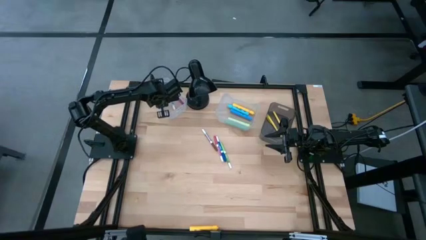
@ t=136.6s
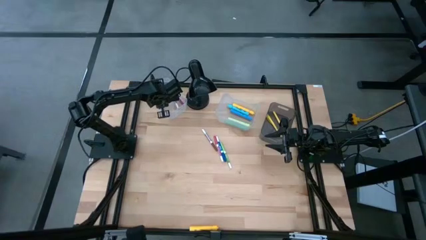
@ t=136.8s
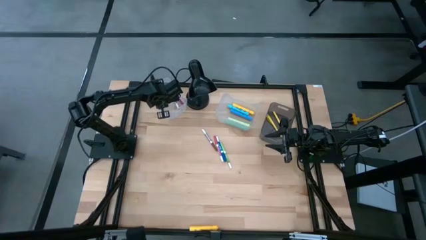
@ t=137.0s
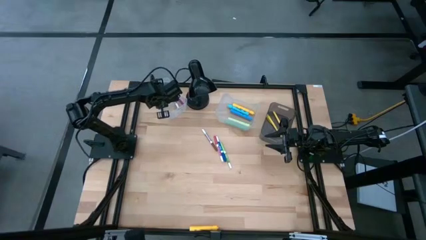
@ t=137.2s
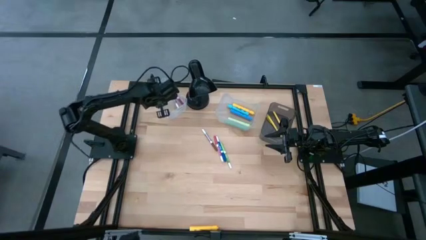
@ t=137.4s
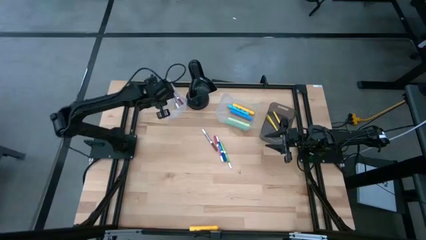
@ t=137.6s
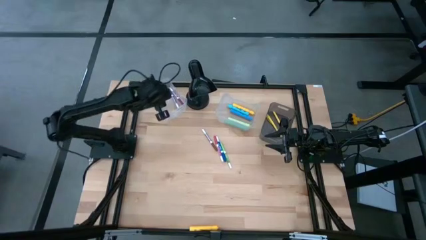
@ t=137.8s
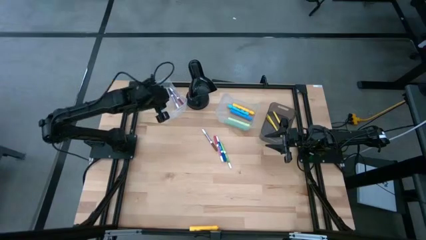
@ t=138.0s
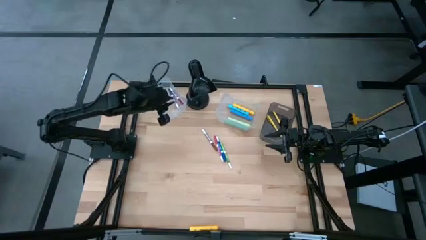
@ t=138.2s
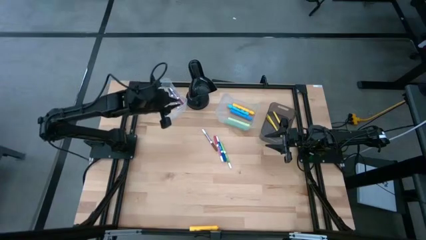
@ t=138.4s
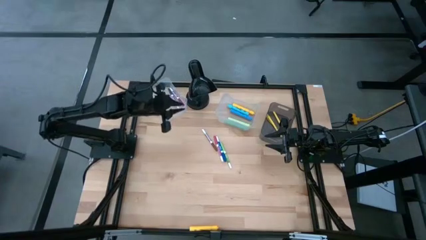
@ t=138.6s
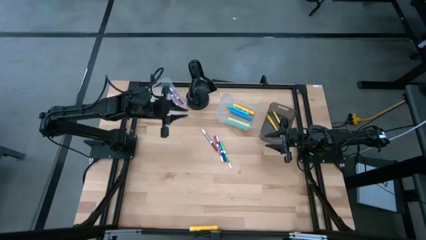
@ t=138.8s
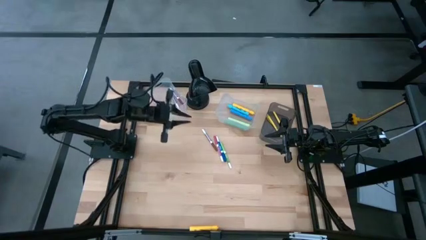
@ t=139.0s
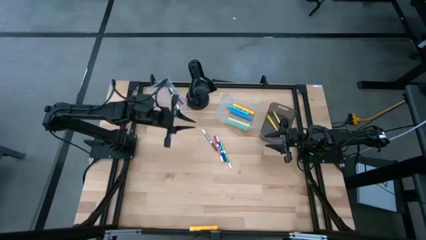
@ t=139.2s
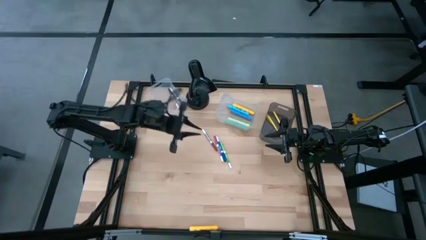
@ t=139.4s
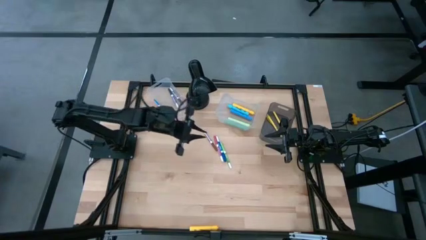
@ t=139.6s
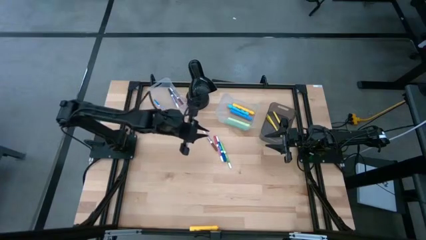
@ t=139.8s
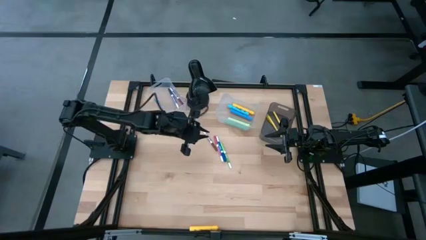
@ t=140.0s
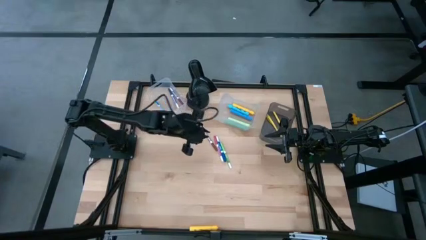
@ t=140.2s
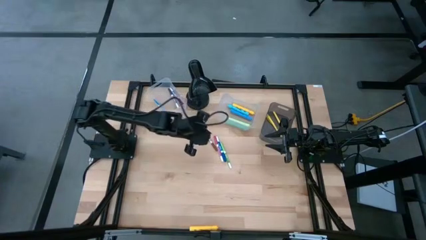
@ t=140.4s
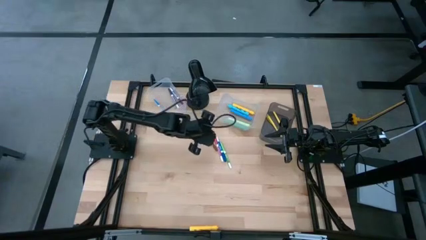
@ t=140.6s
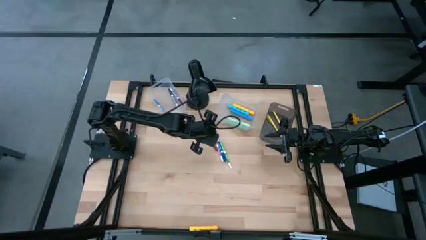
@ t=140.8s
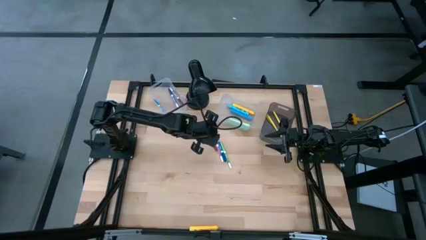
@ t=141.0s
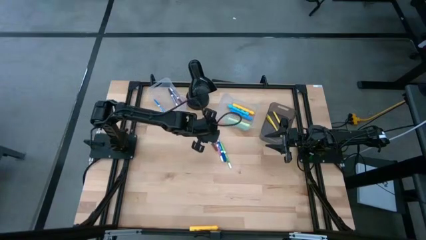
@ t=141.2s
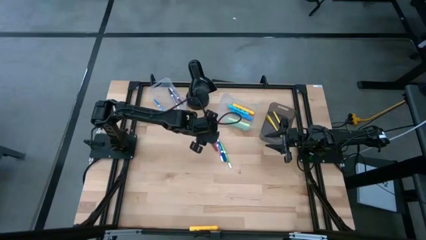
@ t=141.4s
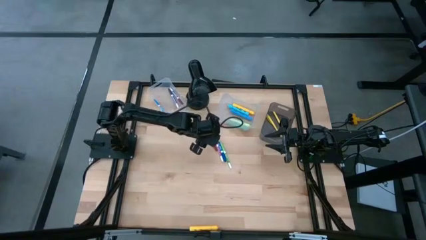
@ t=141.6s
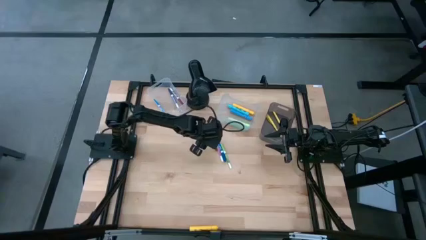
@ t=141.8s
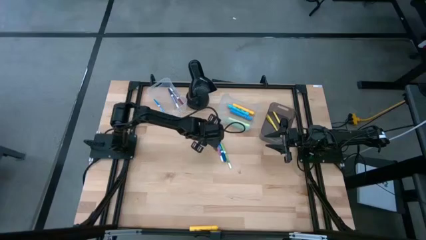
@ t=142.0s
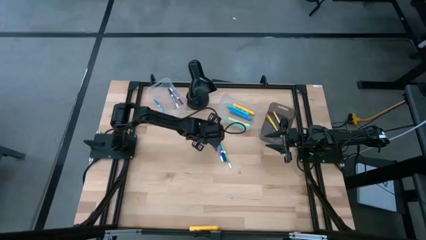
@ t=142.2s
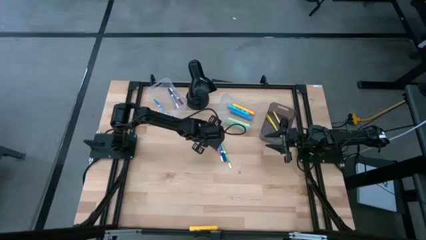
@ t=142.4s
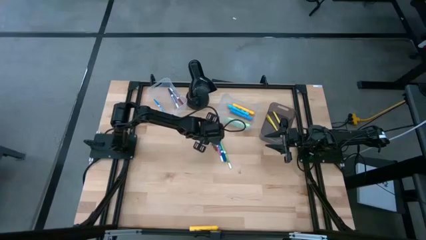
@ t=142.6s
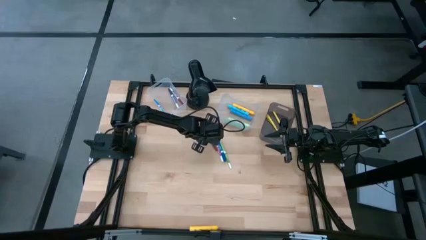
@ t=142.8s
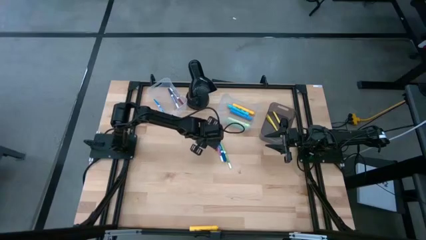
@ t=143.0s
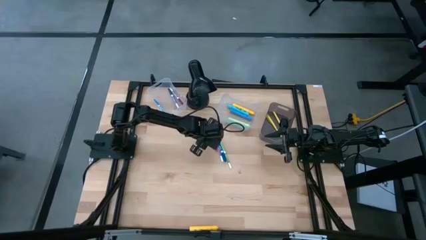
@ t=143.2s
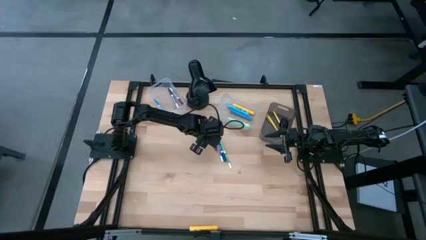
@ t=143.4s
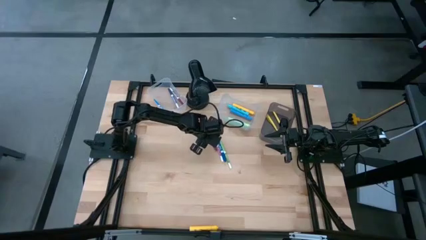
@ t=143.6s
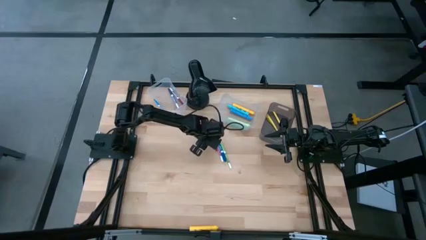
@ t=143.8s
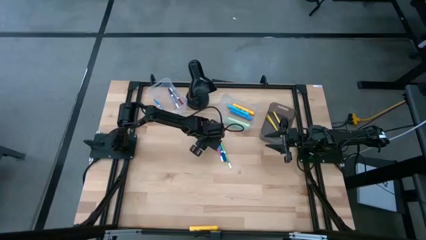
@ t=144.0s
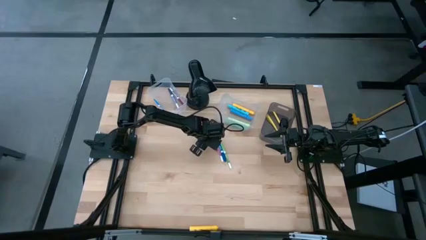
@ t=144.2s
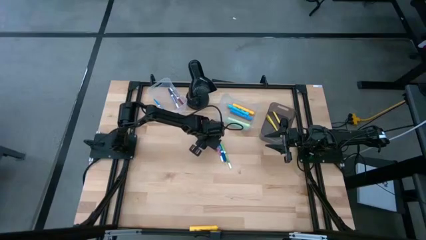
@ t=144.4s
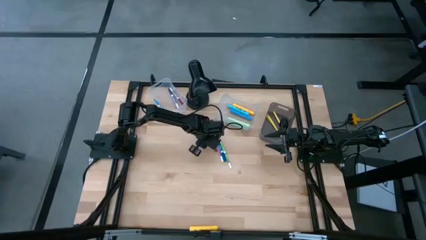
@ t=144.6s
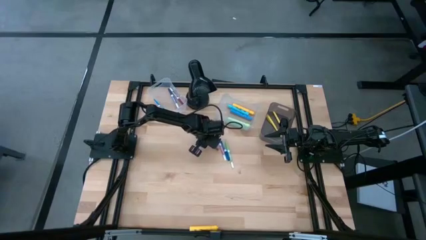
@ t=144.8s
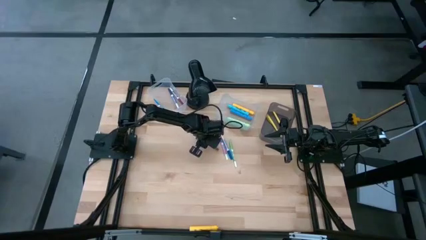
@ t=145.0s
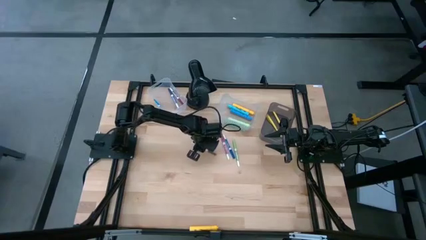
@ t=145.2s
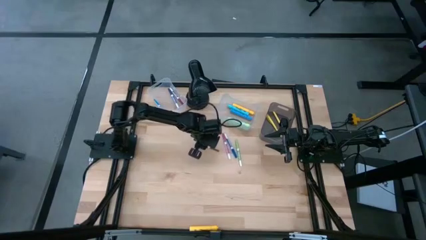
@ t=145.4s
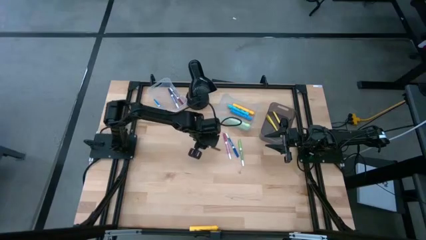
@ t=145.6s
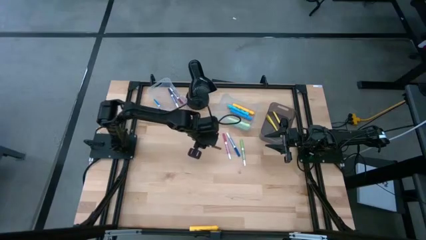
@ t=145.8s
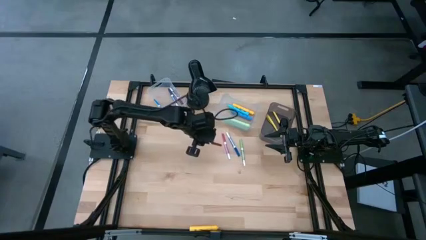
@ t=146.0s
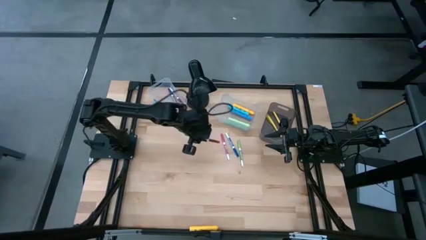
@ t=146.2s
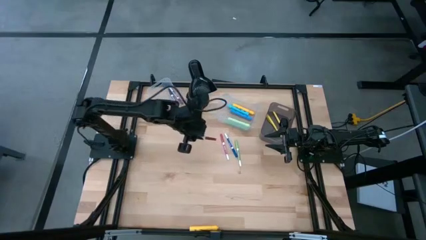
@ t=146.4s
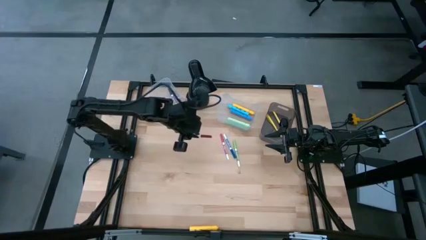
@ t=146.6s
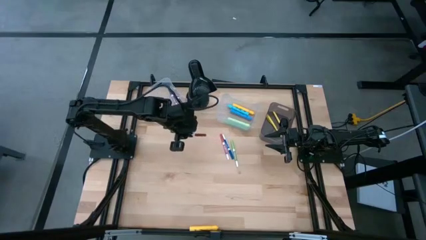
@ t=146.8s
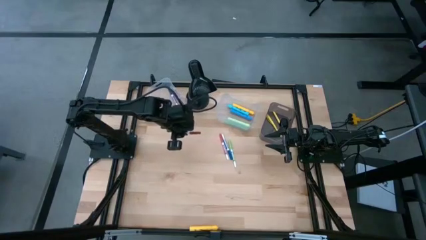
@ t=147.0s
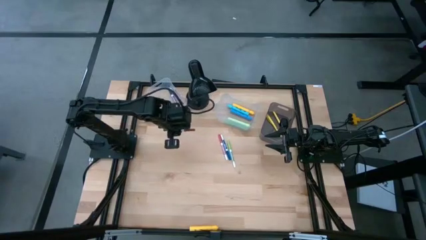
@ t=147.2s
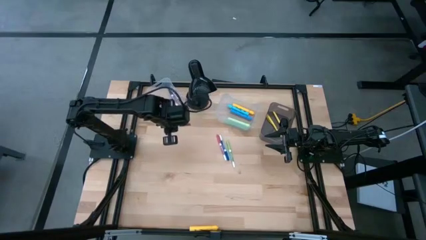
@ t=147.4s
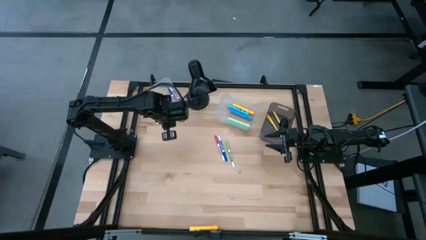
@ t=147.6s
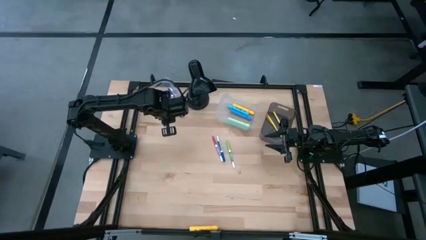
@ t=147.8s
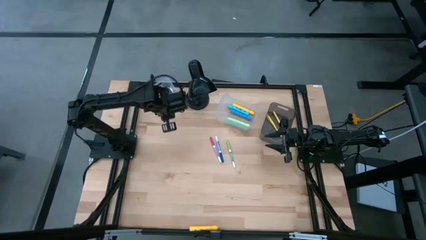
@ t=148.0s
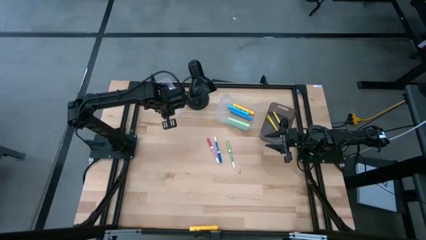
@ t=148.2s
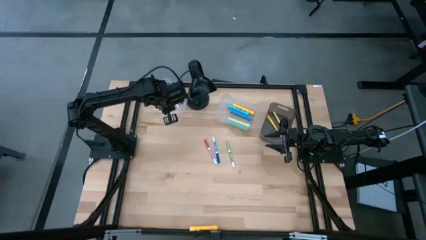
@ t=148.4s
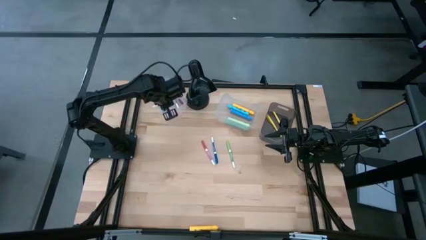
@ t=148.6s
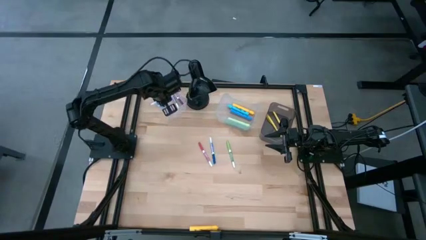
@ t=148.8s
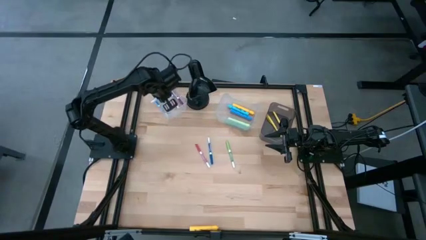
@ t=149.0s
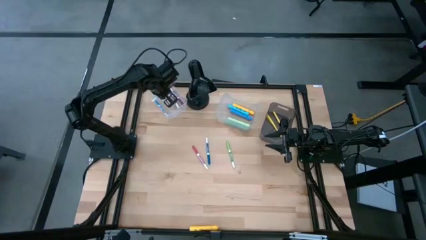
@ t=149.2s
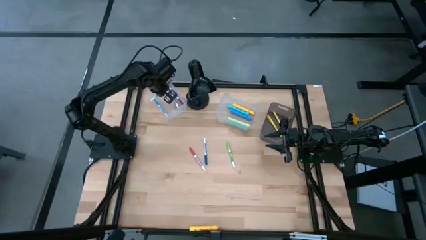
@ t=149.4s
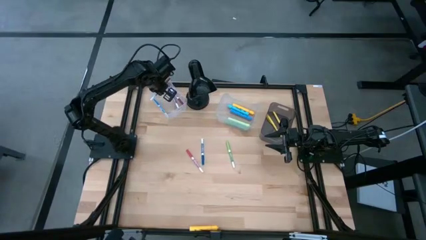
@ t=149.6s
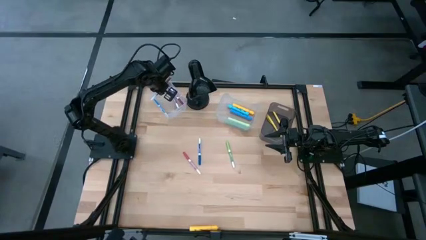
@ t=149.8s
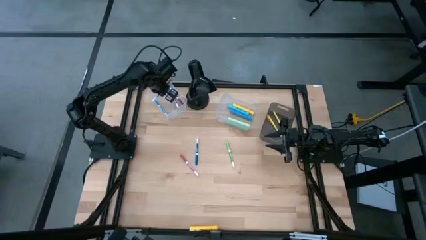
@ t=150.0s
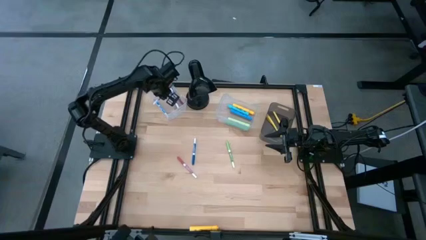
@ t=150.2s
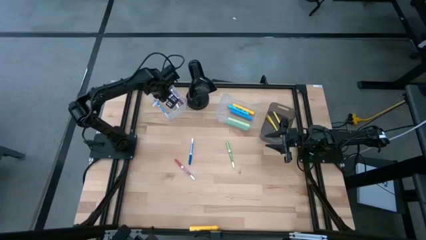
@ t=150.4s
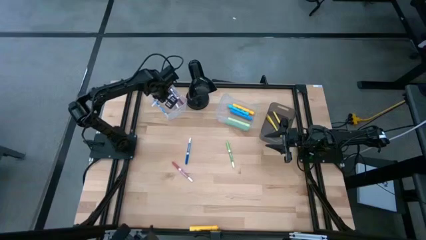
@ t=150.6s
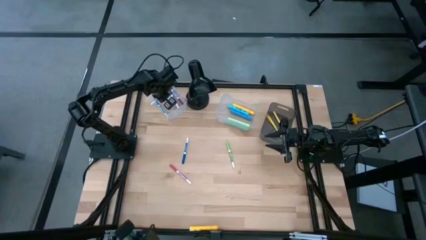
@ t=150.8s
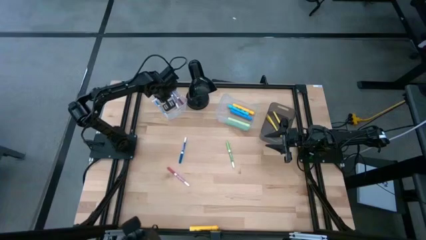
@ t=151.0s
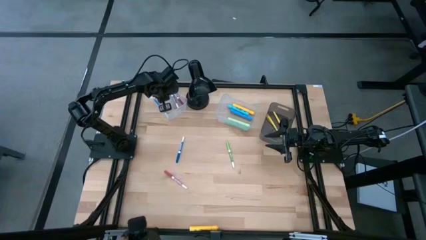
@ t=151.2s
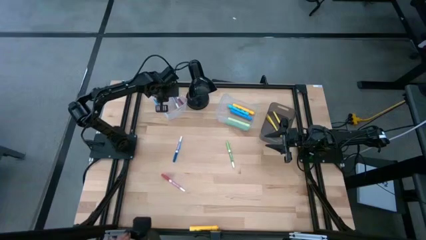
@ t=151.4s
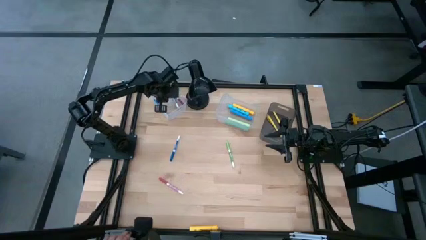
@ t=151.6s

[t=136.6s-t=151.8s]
Task: Pick & Place Markers
Put the brown marker in the left transparent bin
